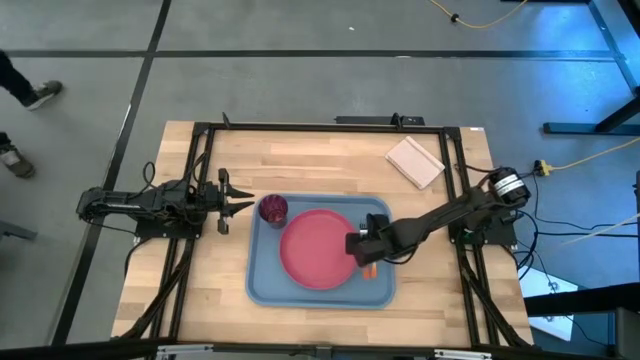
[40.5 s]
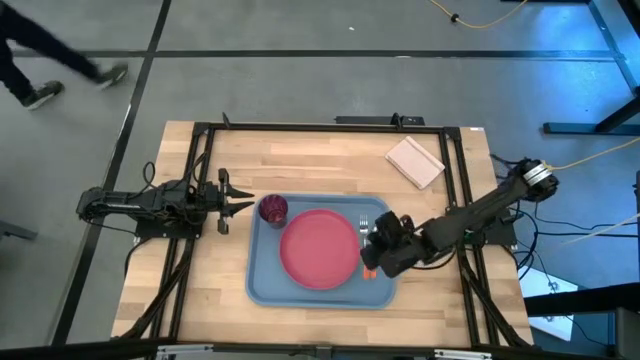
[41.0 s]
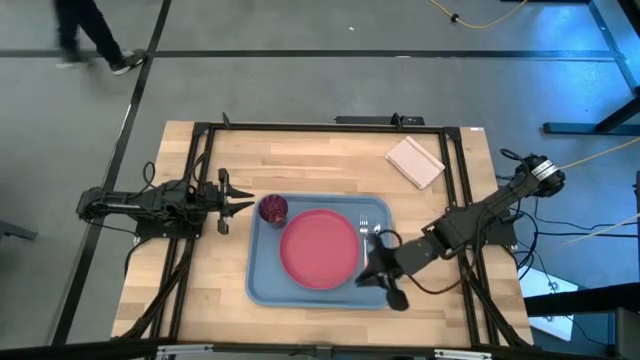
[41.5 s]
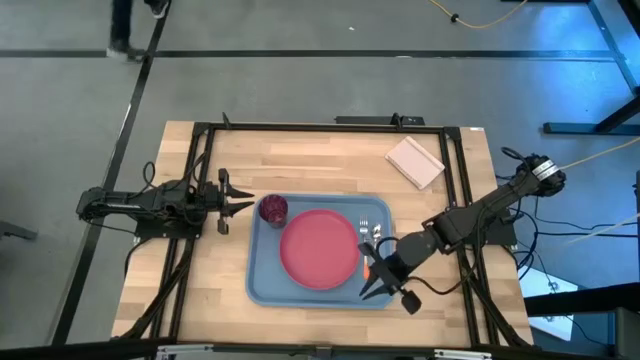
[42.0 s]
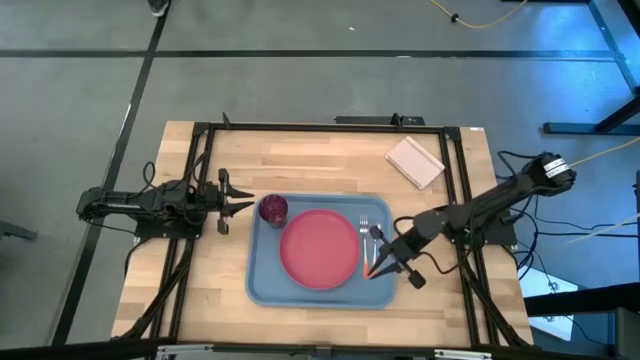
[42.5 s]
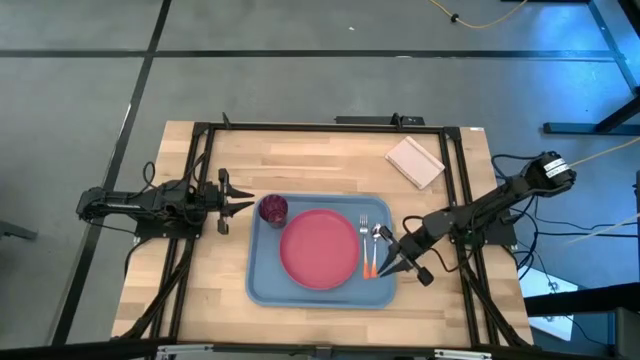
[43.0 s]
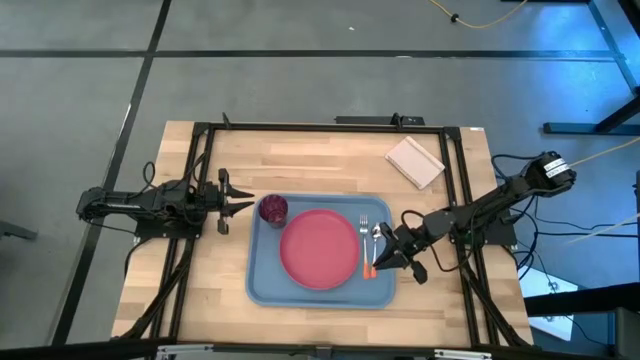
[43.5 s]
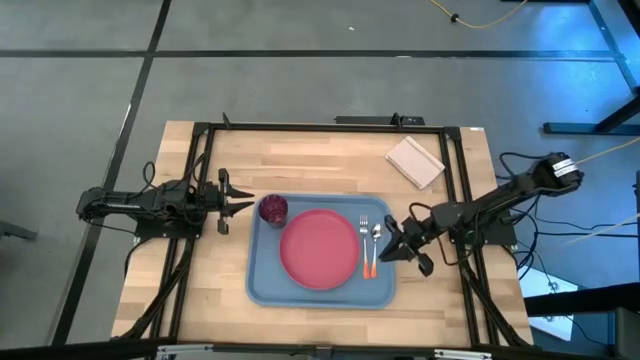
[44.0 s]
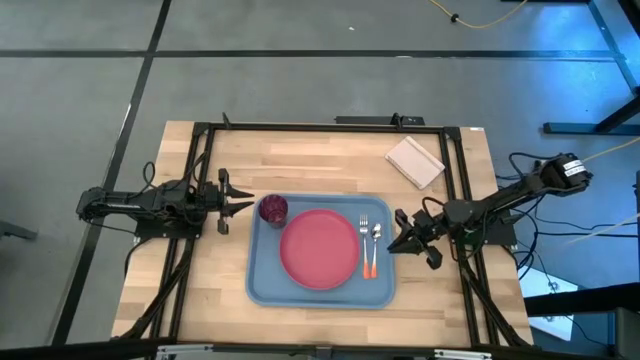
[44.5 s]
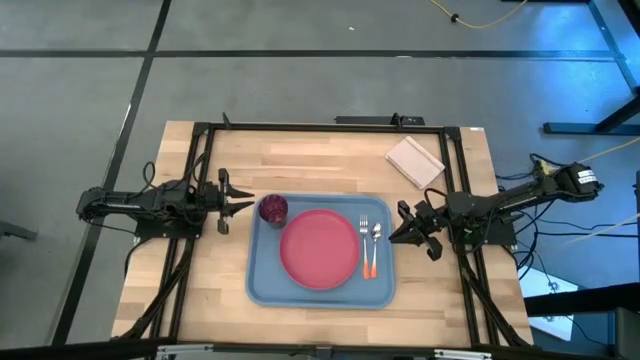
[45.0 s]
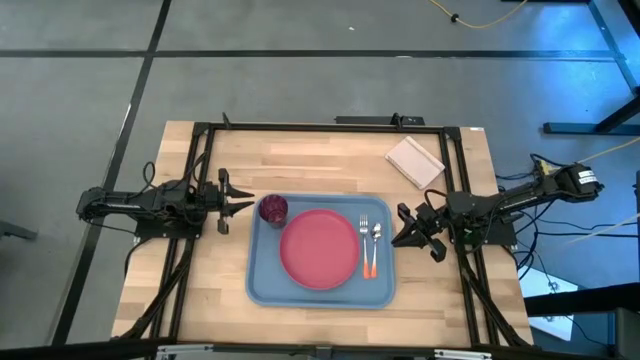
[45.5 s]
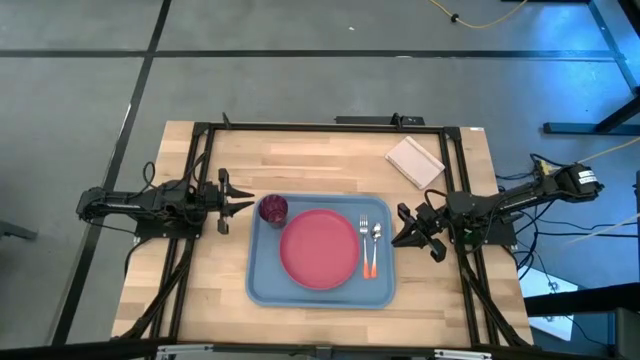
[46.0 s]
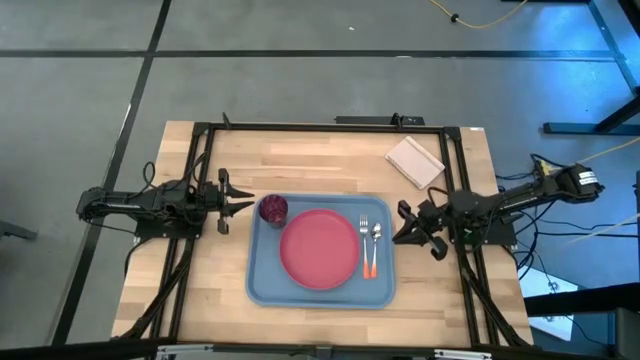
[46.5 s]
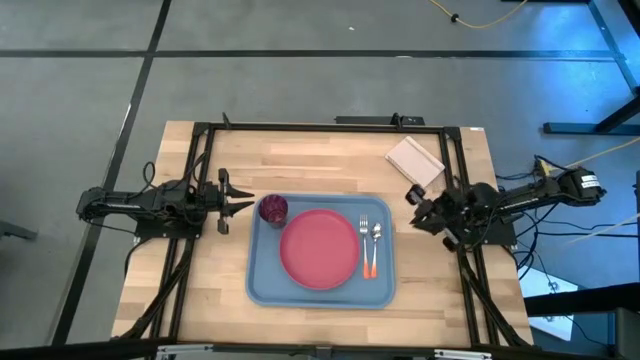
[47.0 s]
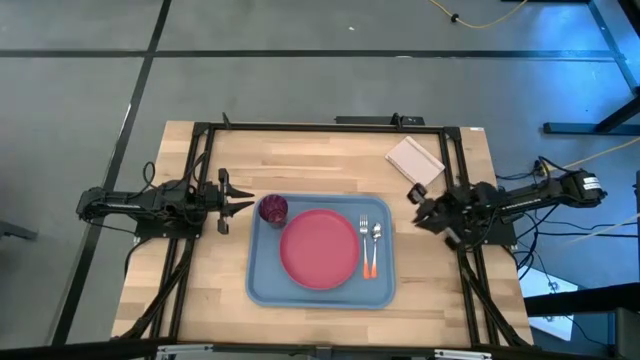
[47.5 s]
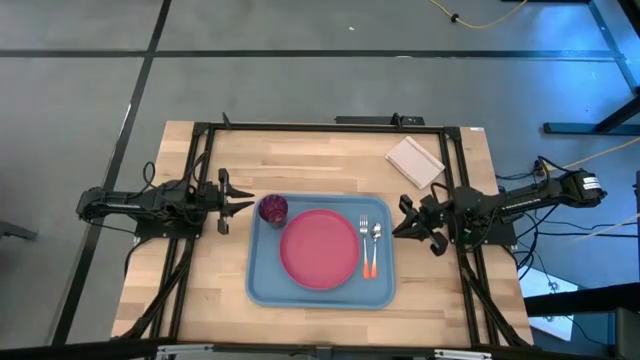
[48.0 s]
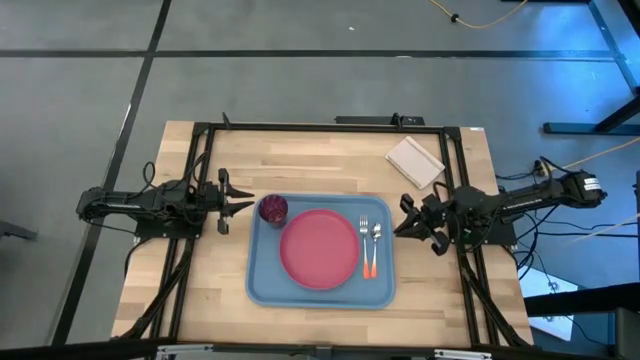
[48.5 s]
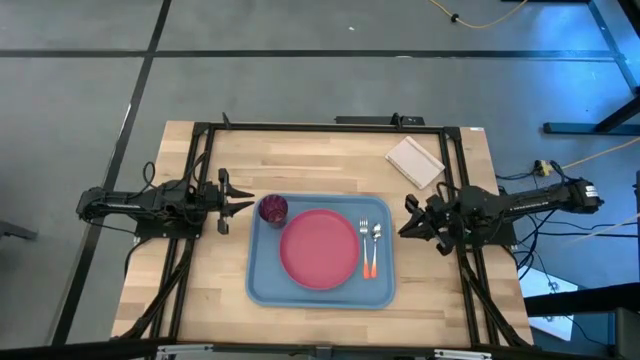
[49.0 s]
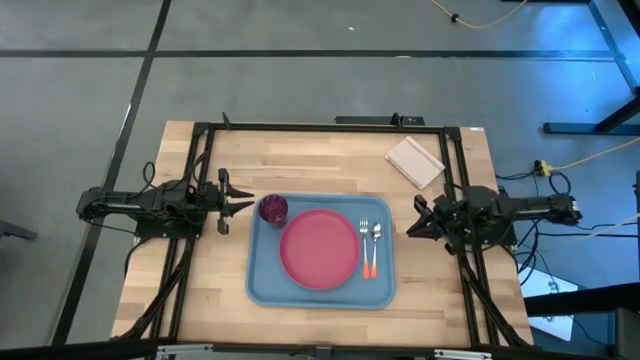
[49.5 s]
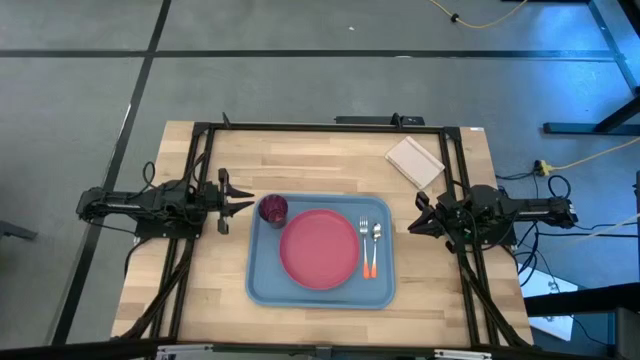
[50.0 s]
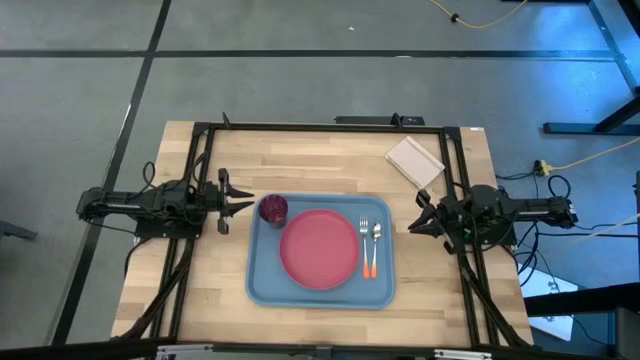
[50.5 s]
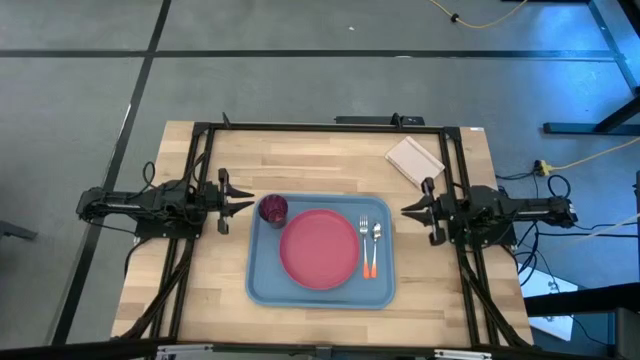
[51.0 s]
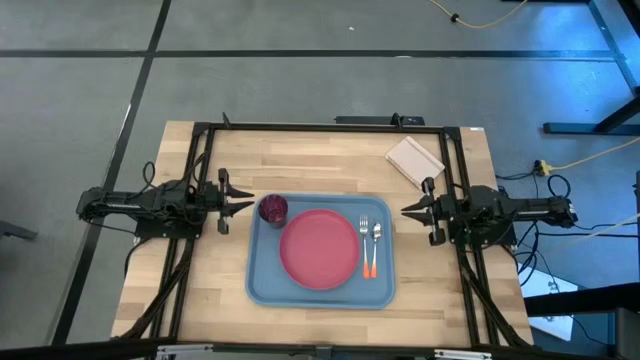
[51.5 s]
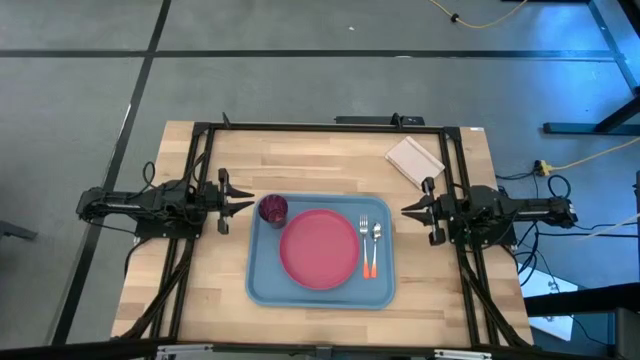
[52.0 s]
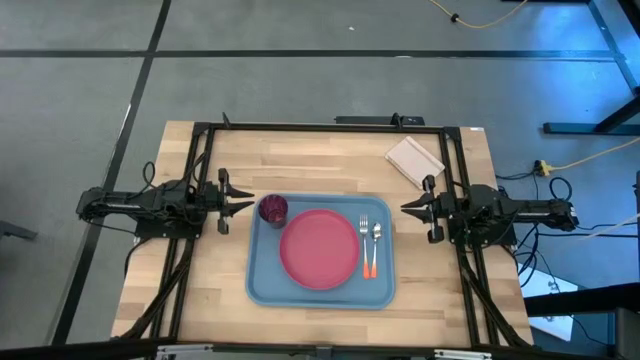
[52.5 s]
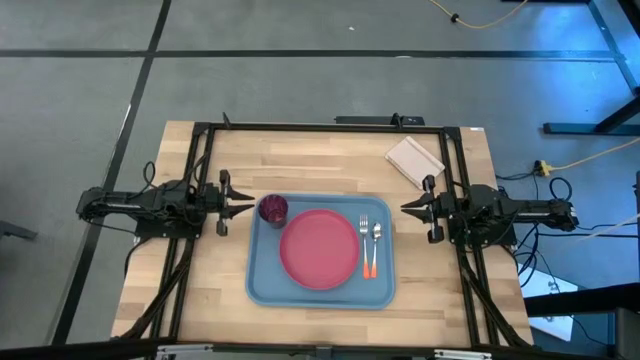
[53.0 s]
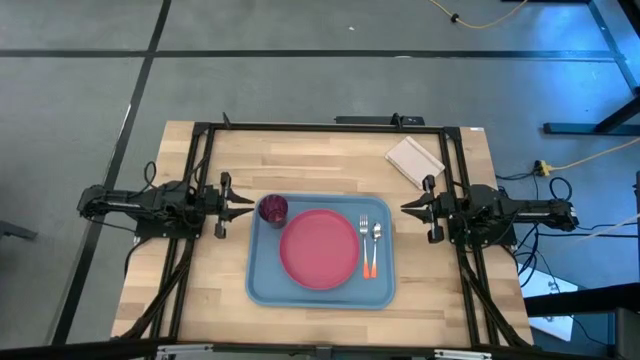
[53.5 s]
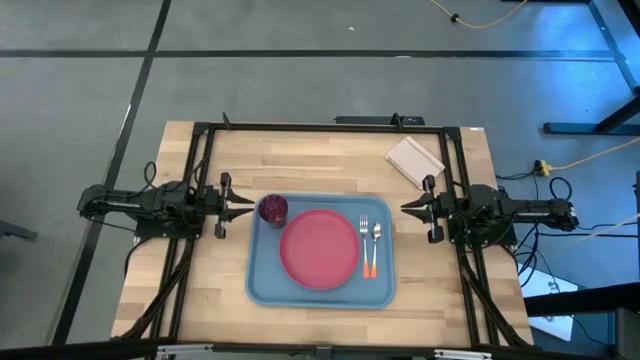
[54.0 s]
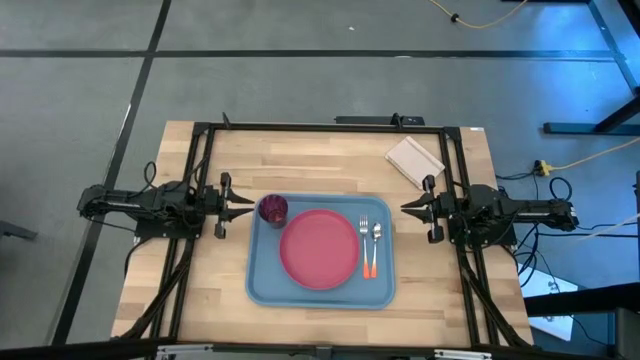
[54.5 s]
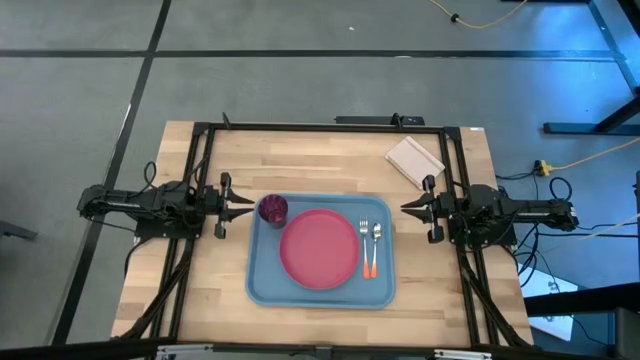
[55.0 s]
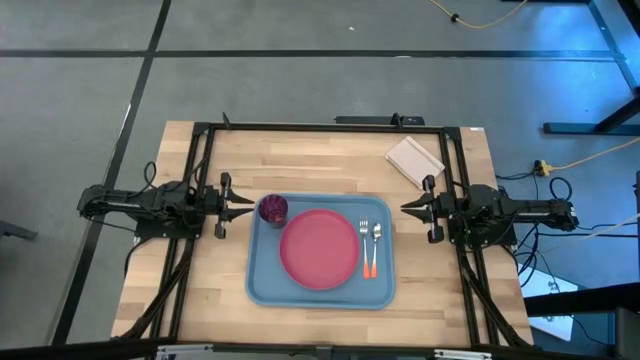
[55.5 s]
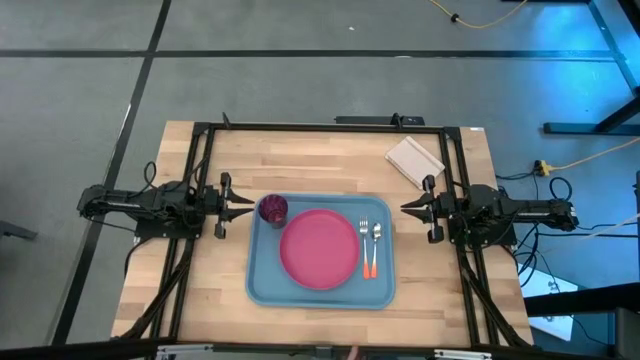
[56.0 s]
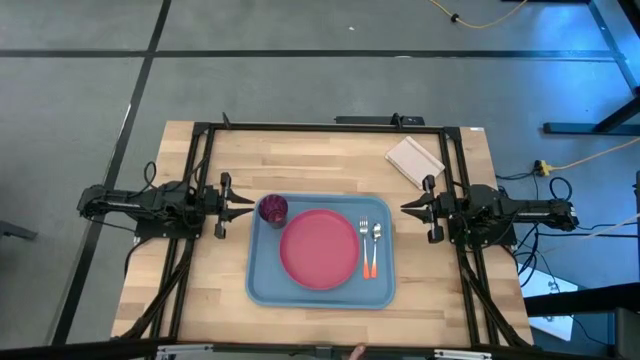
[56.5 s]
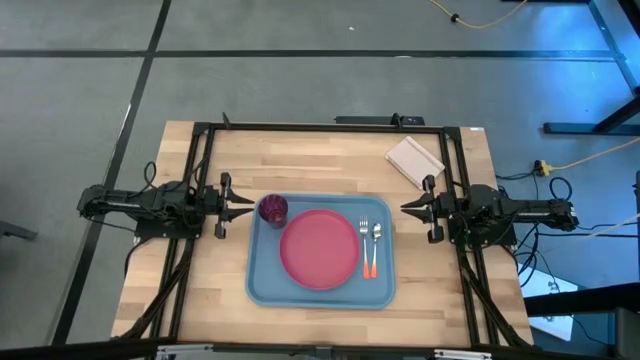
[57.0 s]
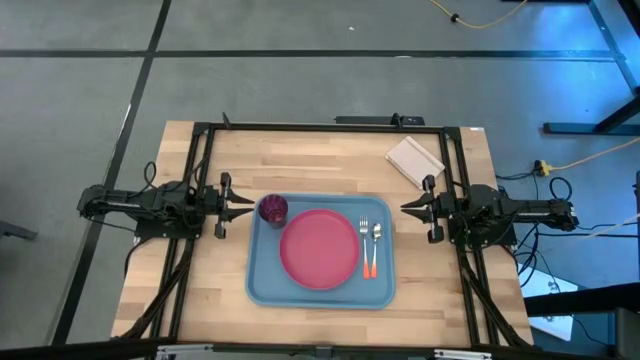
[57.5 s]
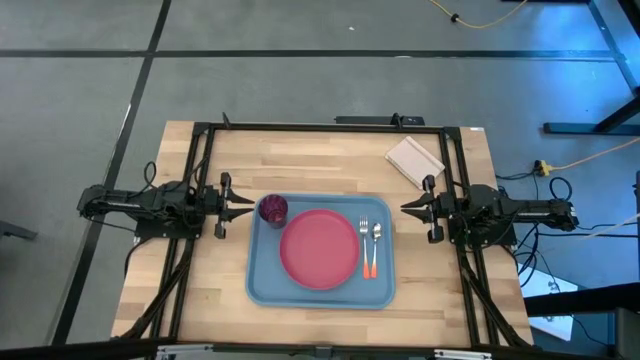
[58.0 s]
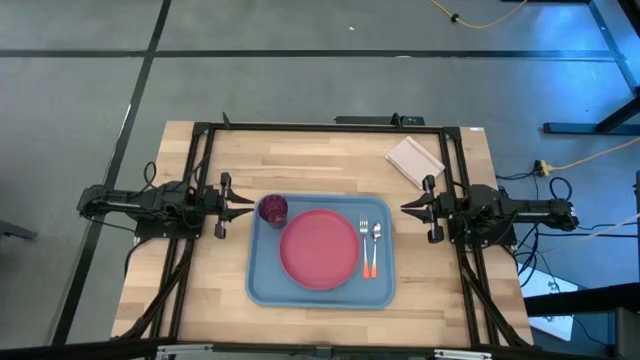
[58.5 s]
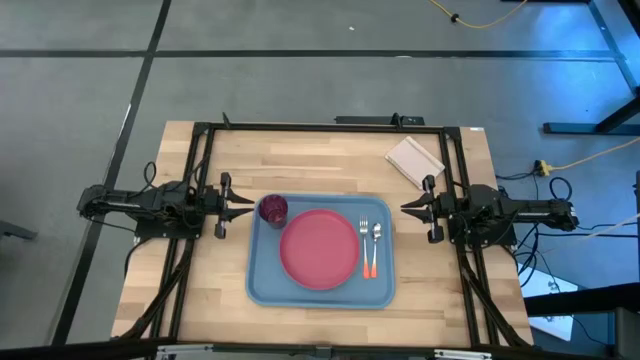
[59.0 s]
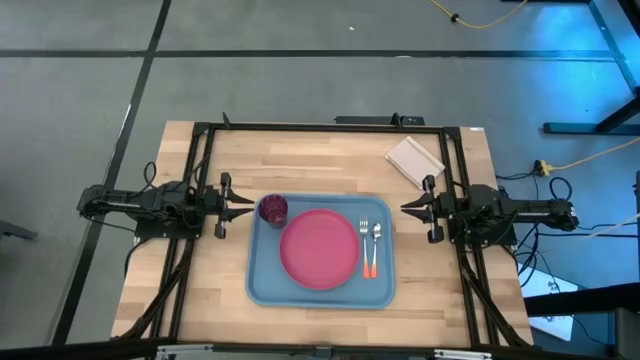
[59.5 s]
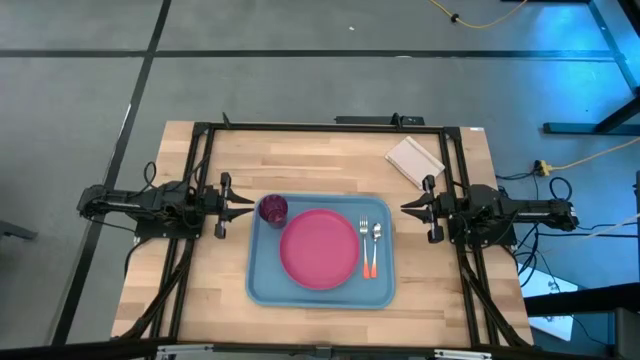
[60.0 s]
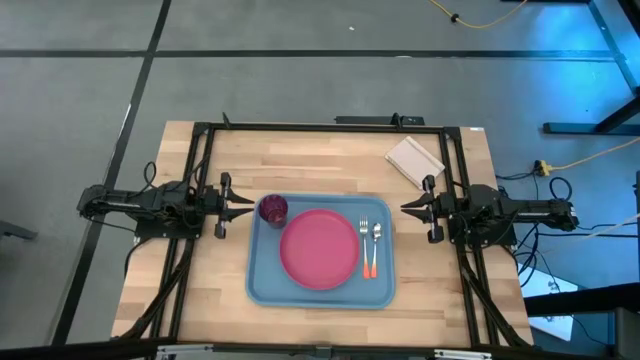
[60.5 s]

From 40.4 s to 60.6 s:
Task: Pick and place plate/cup/fork/spoon on tray
Return to Home Position
